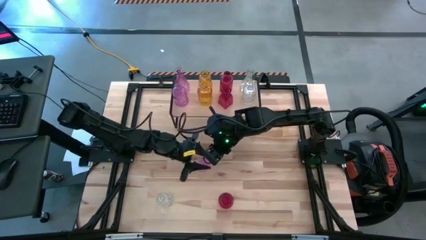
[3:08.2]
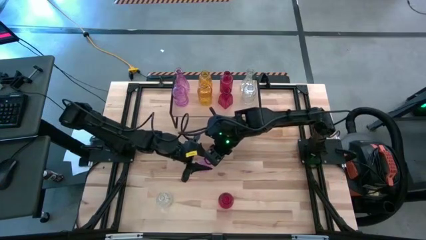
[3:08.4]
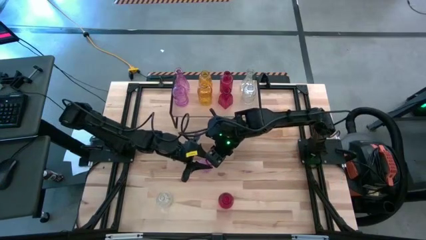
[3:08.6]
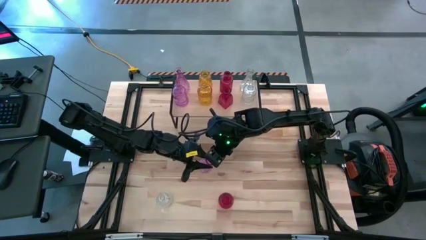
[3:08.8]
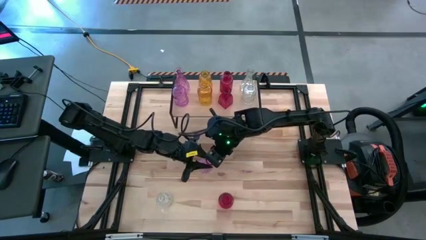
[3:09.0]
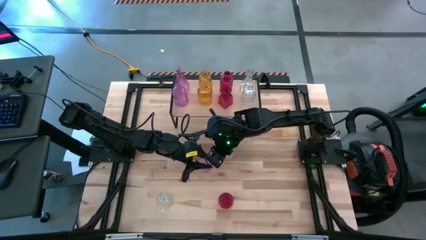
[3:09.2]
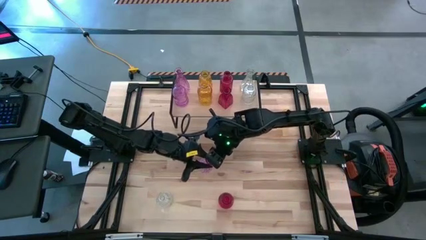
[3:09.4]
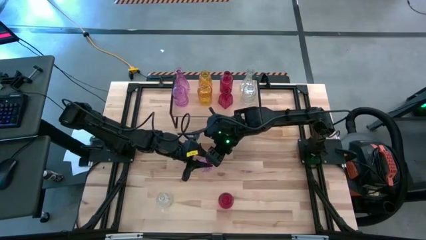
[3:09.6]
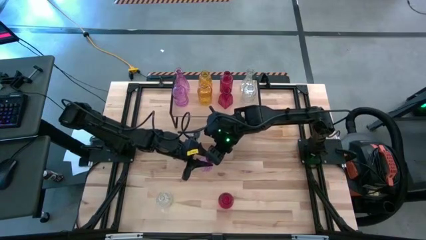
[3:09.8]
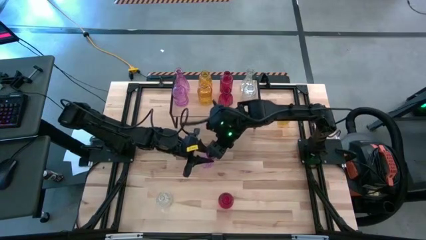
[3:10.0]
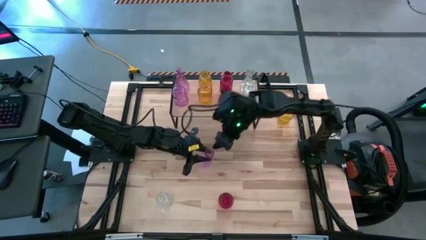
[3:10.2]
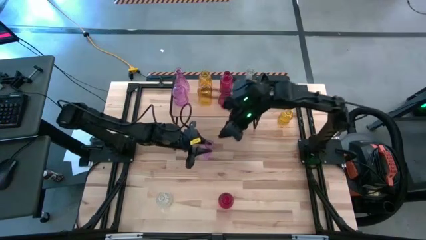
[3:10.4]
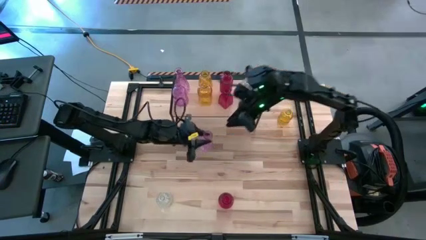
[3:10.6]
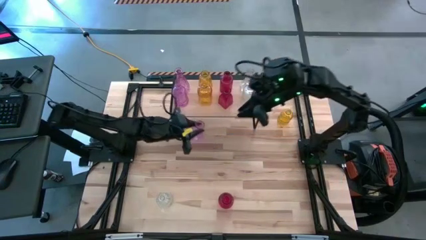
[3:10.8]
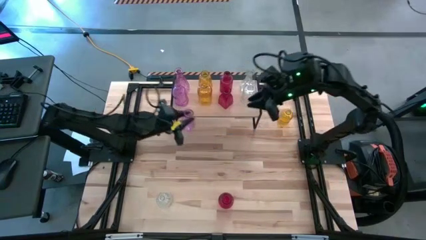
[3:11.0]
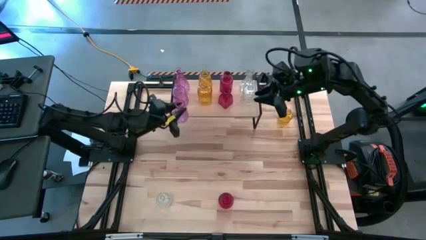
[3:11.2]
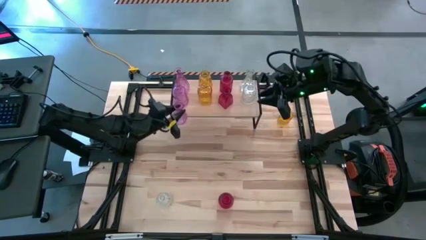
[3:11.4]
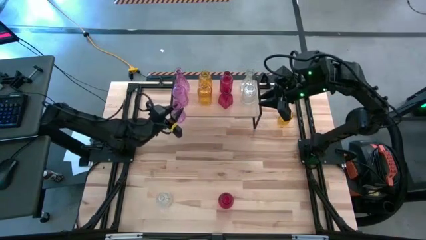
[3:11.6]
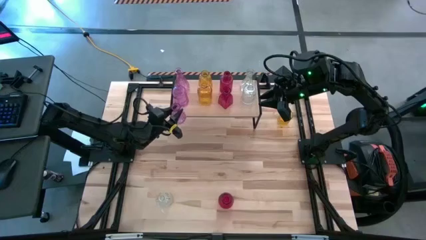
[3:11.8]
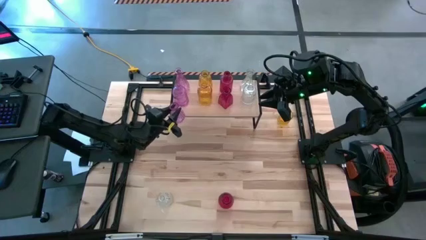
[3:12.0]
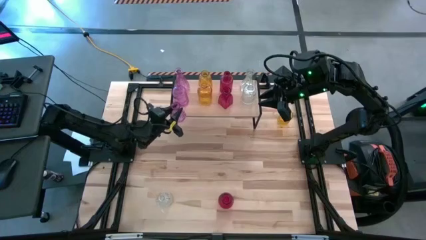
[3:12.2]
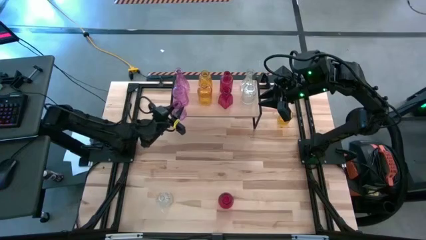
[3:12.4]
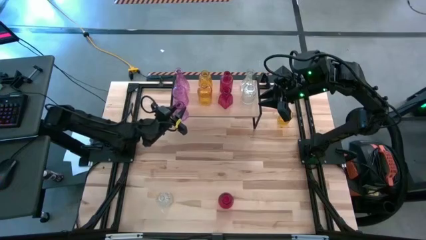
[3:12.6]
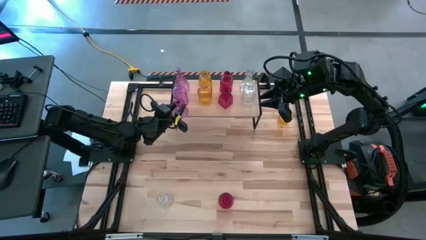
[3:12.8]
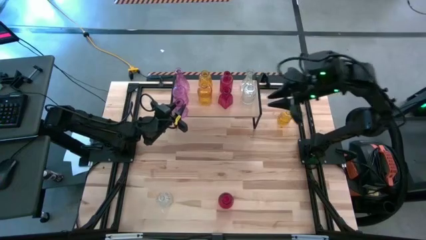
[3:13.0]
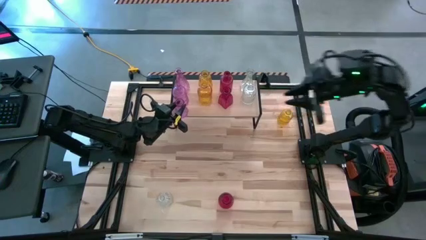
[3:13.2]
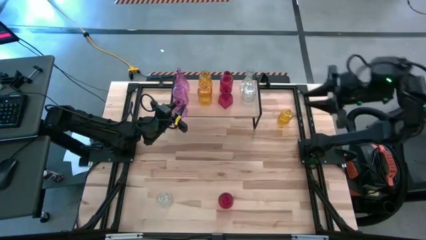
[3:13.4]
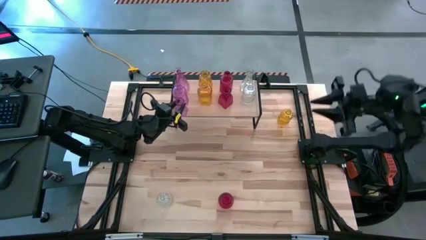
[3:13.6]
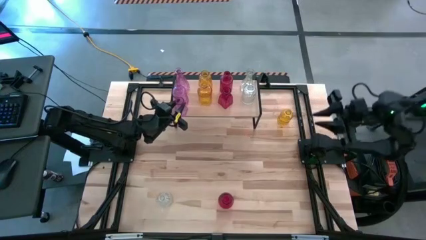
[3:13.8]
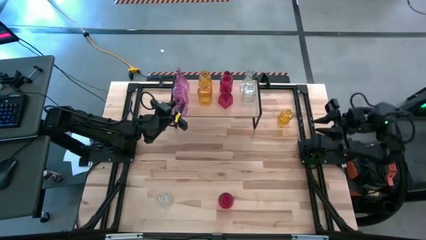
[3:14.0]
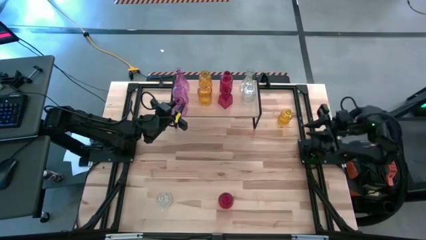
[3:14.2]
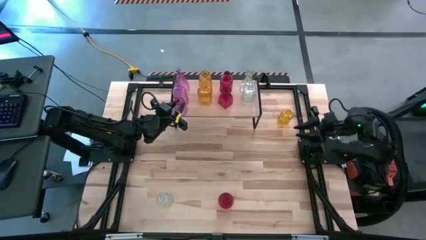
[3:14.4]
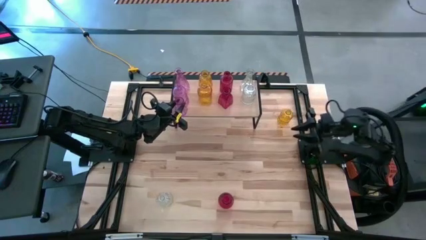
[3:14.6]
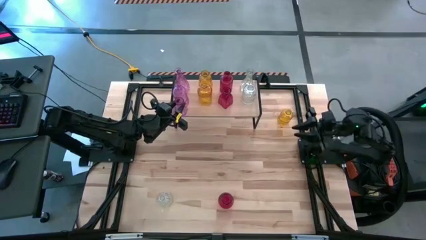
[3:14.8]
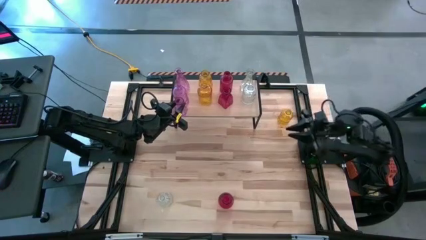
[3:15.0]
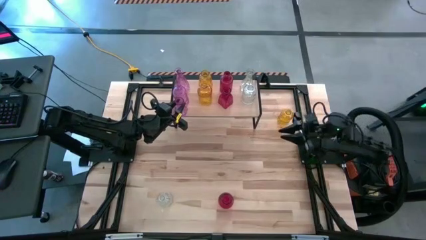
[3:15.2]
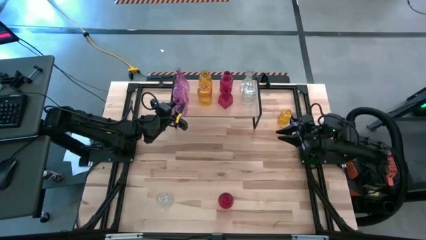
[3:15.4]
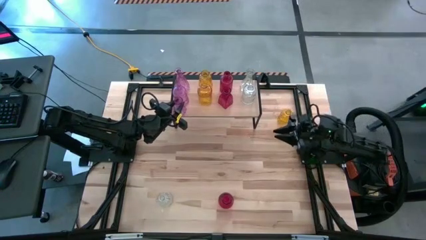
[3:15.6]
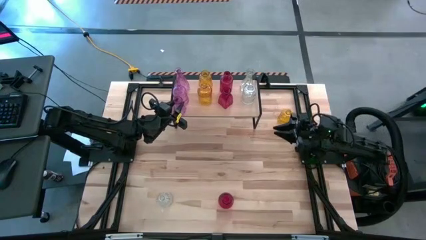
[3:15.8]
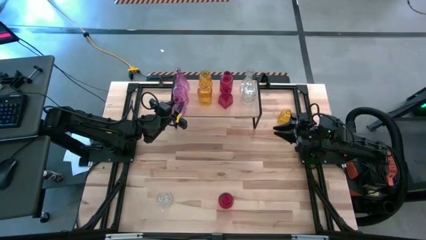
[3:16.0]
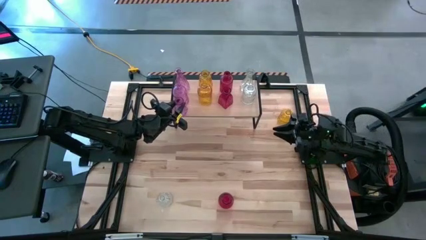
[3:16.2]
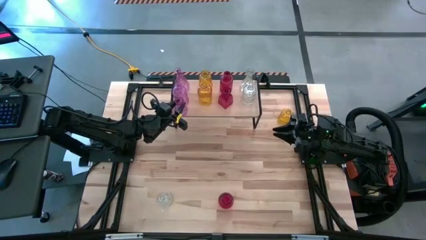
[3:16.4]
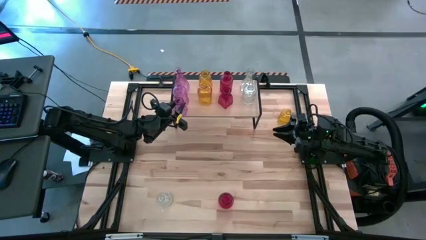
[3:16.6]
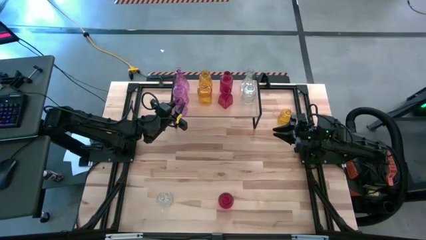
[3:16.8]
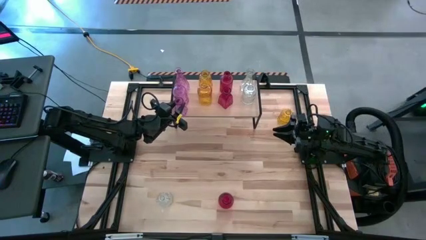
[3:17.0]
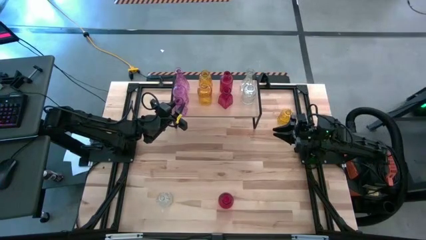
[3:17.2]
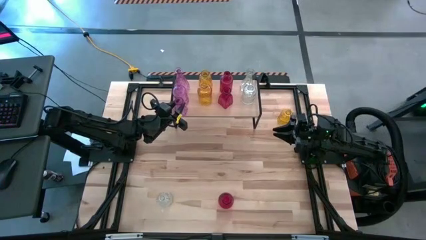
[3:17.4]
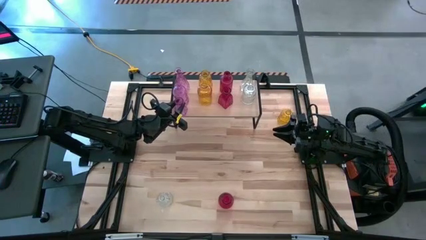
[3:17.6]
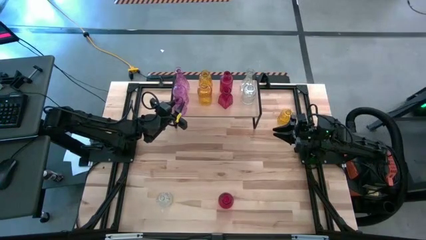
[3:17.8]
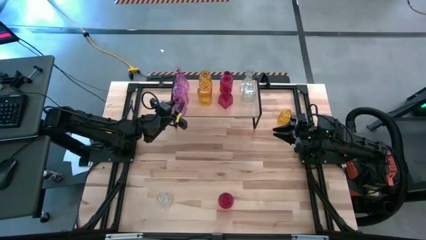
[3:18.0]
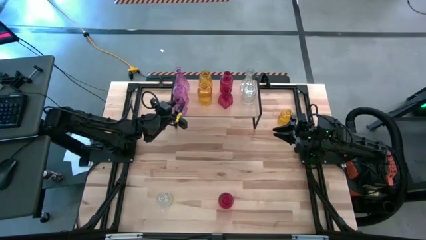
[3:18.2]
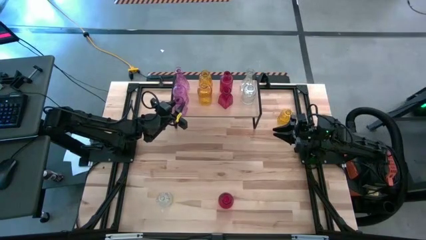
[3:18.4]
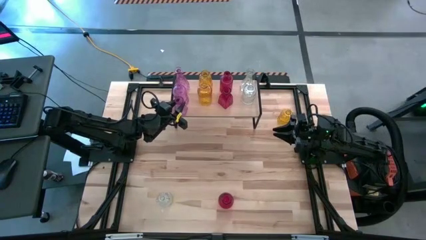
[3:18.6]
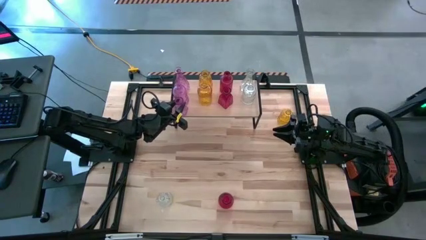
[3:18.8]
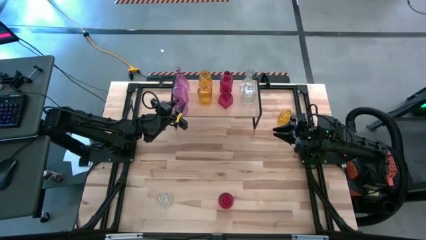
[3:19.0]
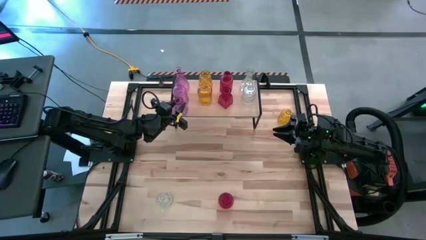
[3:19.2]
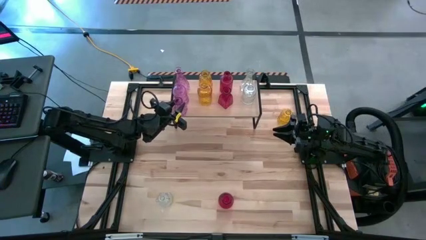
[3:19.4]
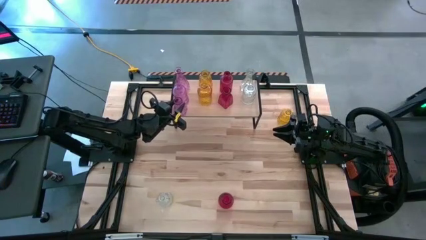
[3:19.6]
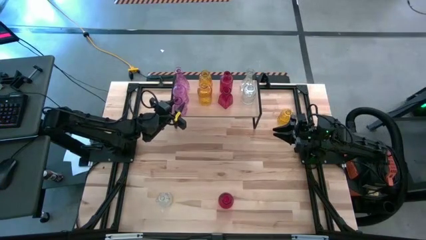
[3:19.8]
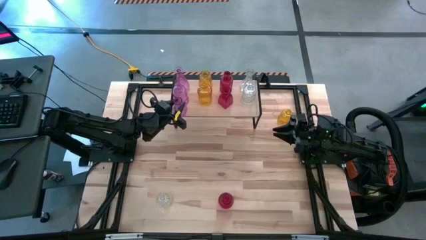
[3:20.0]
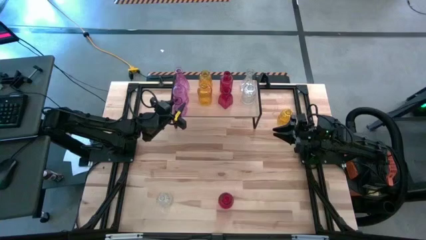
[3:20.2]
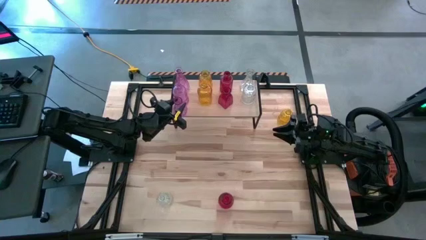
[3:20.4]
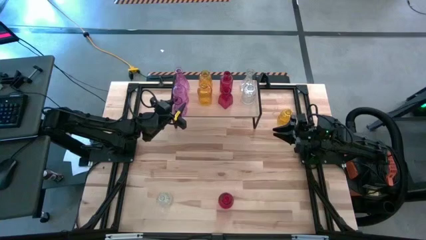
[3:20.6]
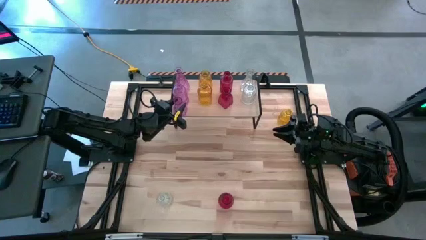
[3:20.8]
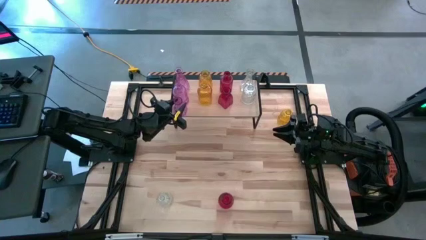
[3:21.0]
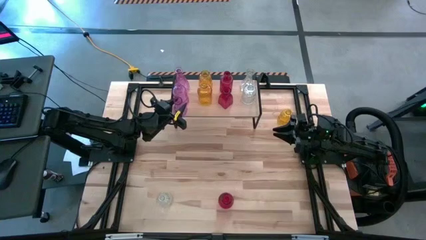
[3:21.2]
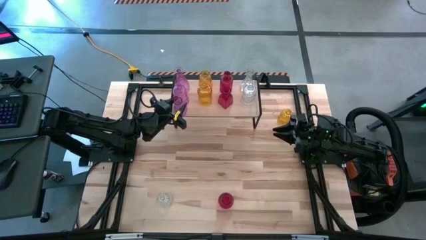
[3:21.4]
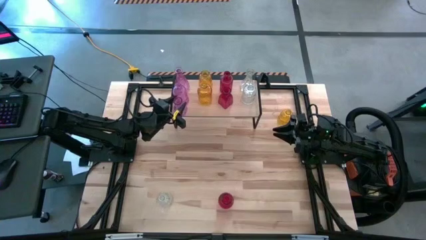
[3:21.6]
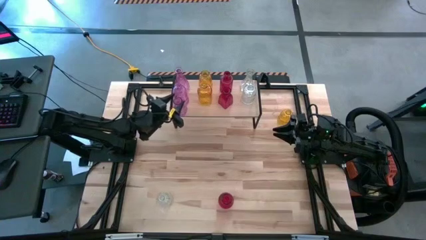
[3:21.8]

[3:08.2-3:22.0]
Task: sort vases onto shelf
Put the purple vase on the shelf and align it with the other purple vases

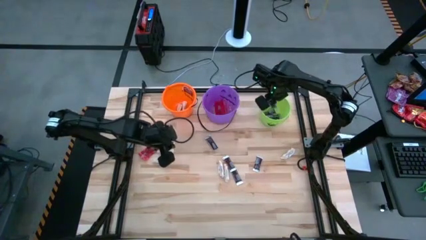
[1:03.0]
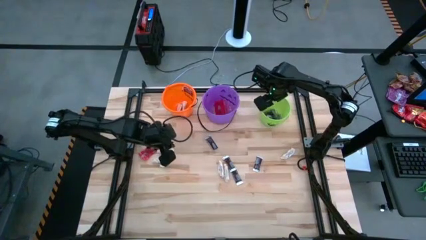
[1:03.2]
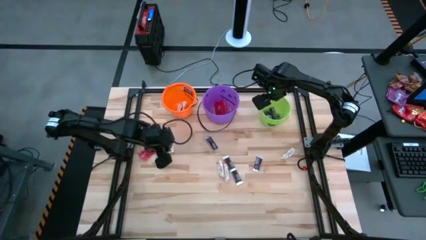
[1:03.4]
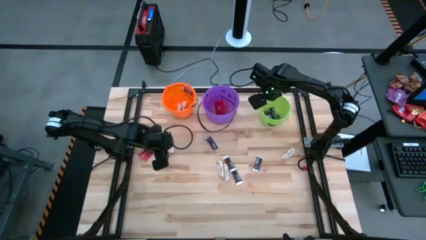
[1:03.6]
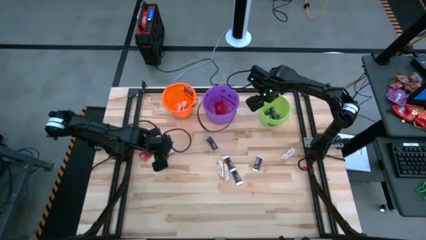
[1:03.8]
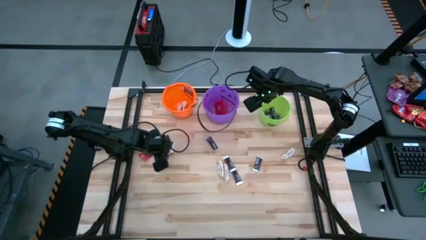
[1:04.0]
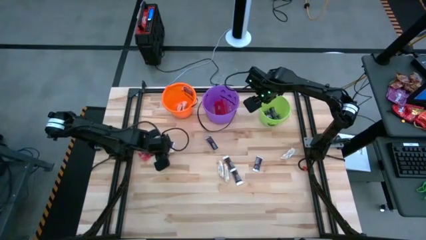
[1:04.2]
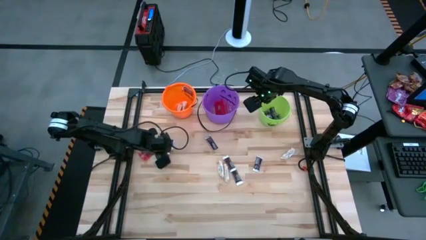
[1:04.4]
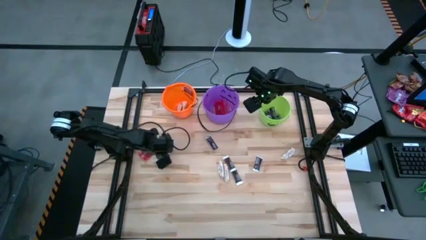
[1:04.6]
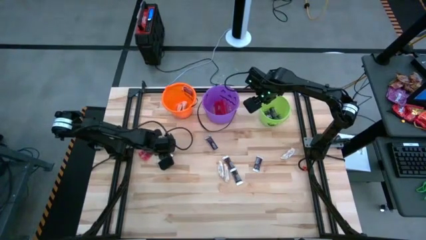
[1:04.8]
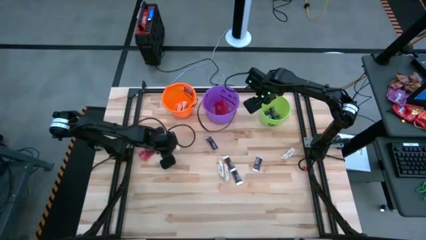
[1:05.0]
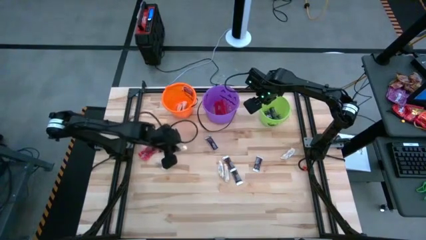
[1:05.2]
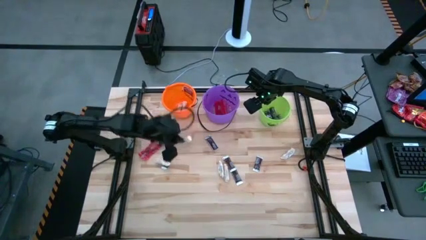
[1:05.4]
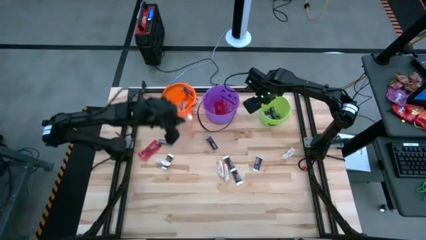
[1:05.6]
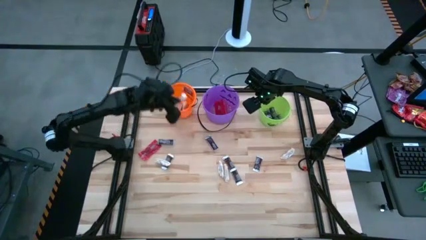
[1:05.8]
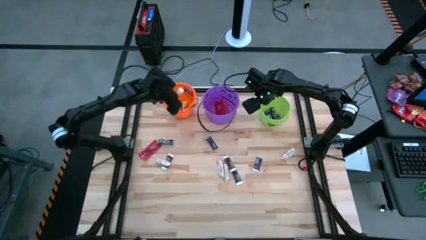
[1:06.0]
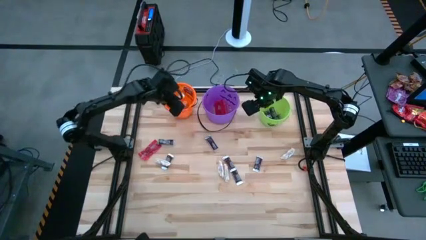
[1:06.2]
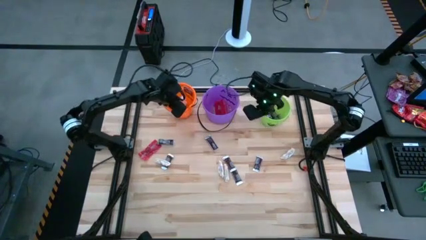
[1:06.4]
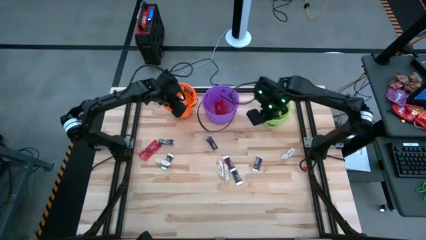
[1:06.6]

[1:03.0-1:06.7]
Task: Sort candy by brand, put in halloween buckets
Put the white chocolate bar into the orange bucket
